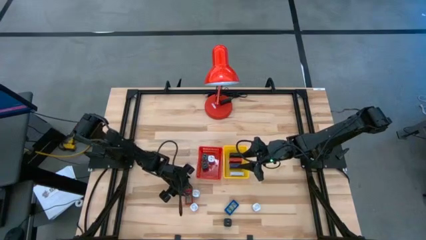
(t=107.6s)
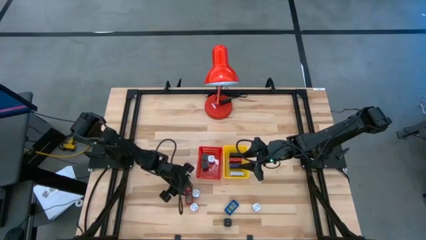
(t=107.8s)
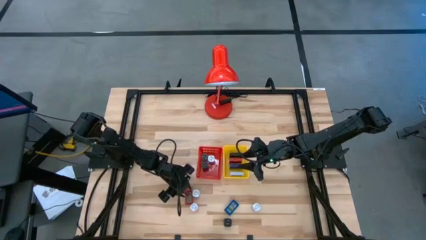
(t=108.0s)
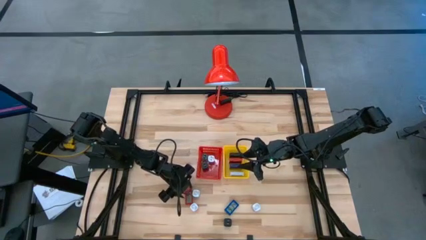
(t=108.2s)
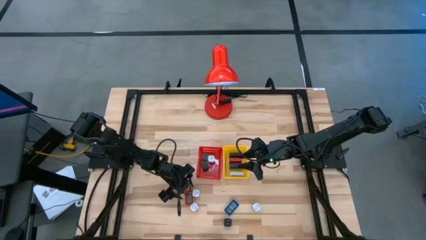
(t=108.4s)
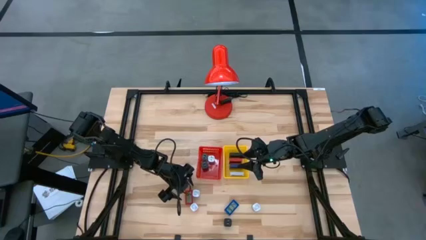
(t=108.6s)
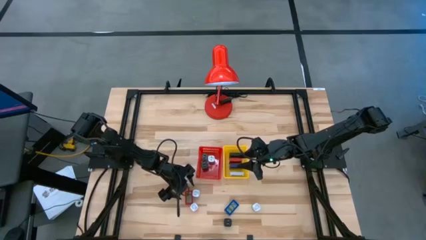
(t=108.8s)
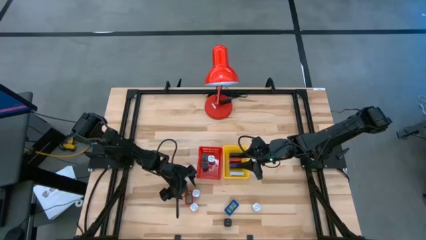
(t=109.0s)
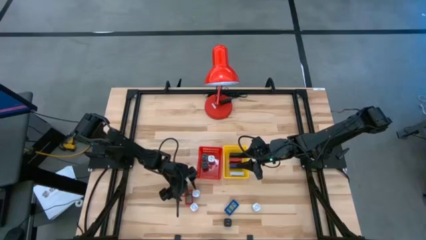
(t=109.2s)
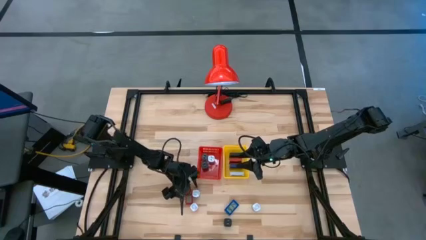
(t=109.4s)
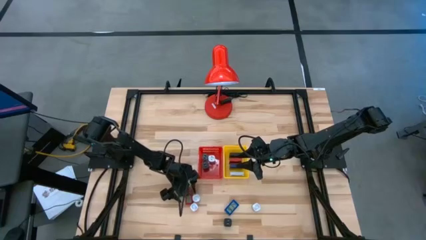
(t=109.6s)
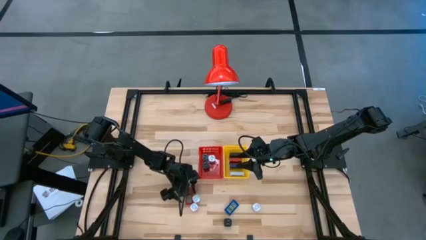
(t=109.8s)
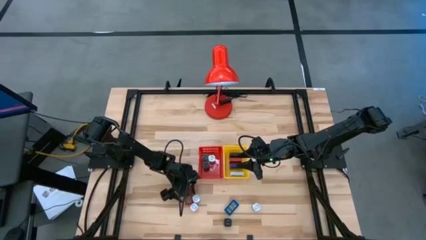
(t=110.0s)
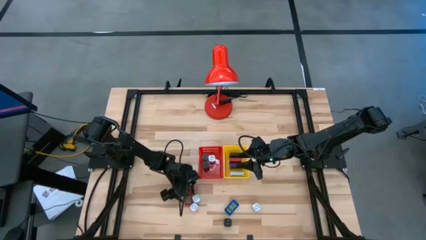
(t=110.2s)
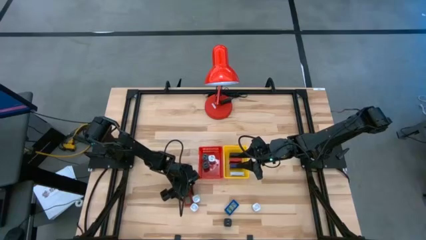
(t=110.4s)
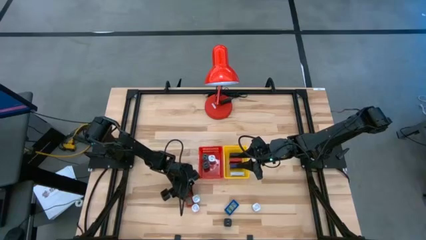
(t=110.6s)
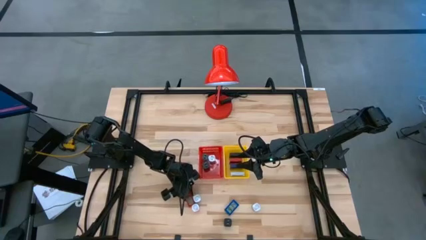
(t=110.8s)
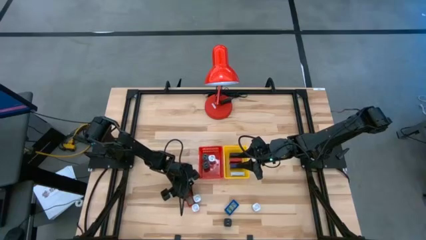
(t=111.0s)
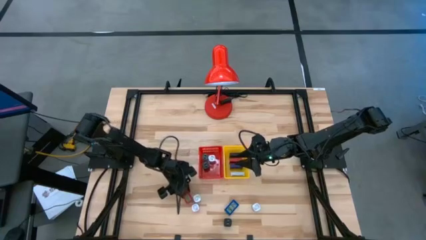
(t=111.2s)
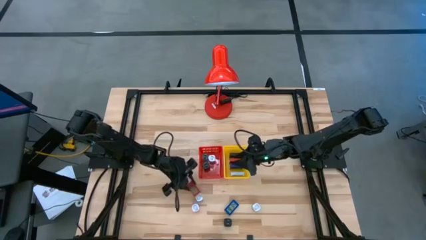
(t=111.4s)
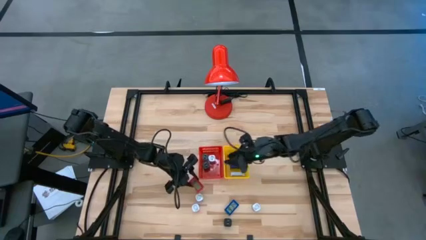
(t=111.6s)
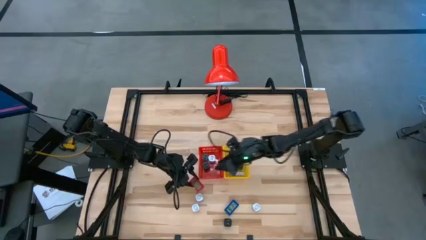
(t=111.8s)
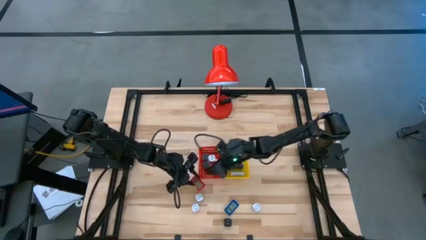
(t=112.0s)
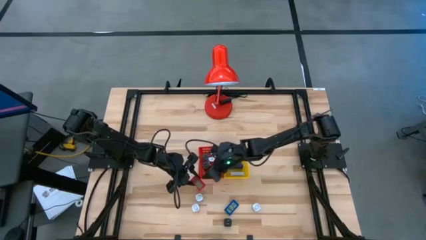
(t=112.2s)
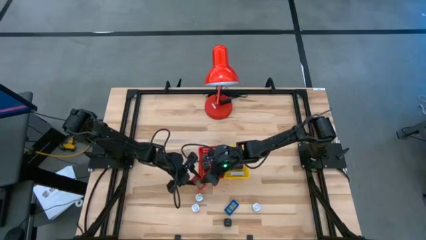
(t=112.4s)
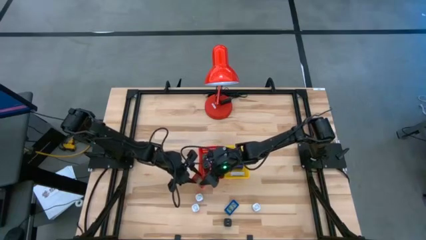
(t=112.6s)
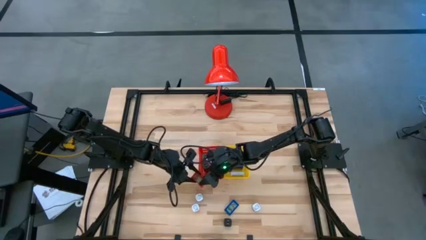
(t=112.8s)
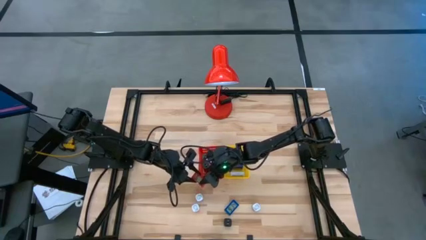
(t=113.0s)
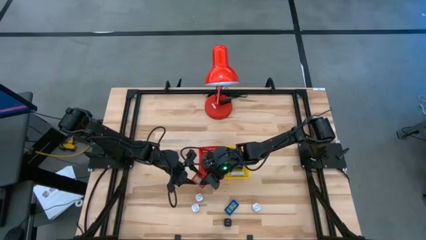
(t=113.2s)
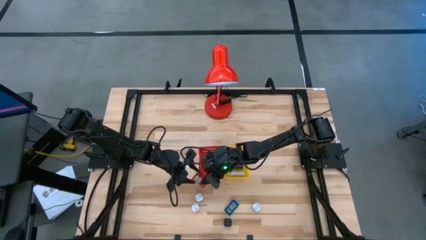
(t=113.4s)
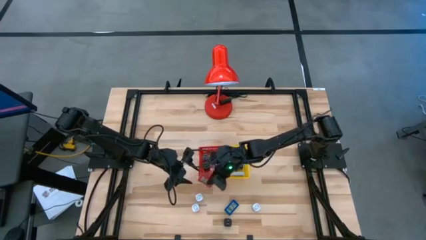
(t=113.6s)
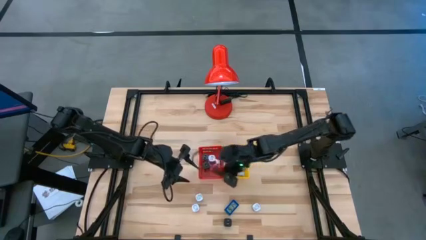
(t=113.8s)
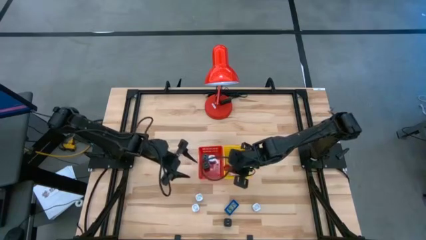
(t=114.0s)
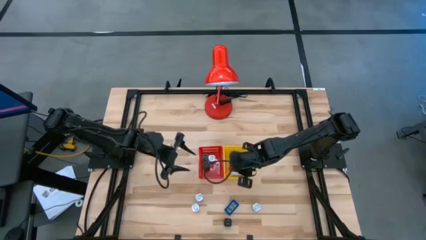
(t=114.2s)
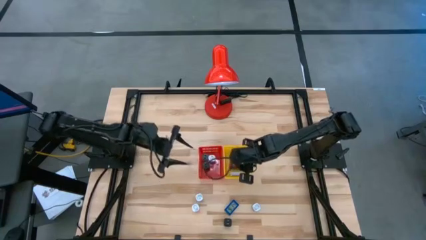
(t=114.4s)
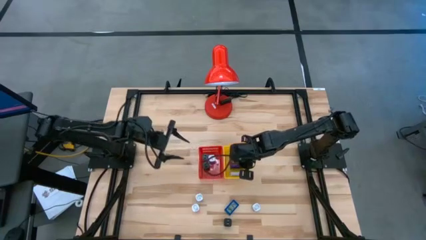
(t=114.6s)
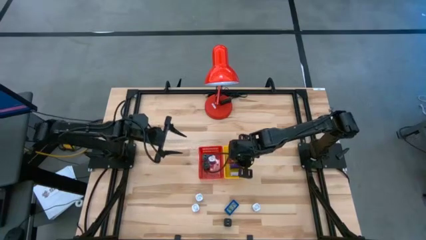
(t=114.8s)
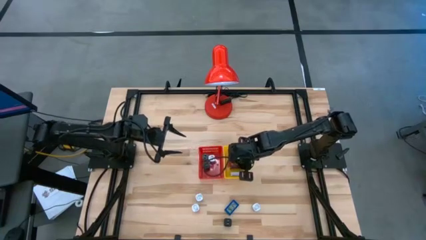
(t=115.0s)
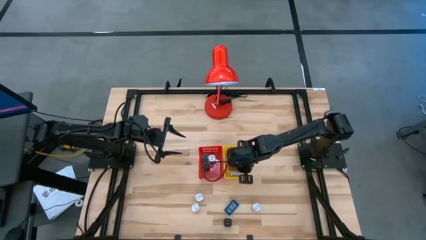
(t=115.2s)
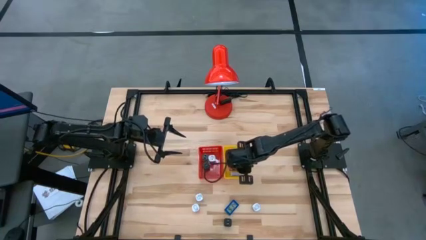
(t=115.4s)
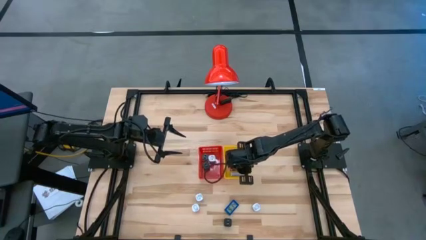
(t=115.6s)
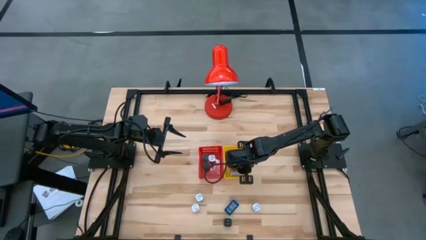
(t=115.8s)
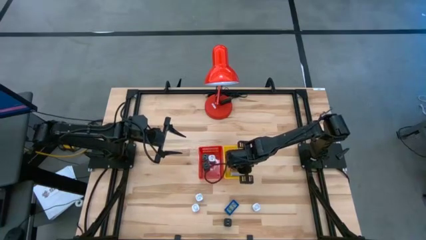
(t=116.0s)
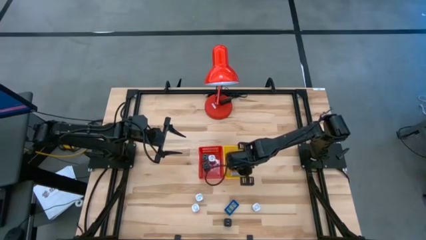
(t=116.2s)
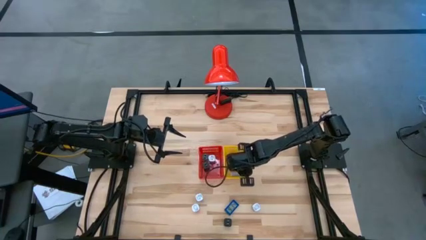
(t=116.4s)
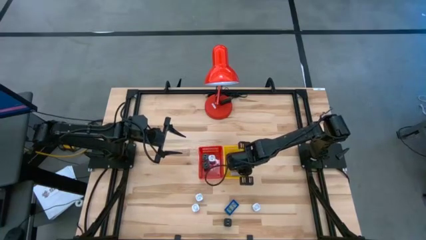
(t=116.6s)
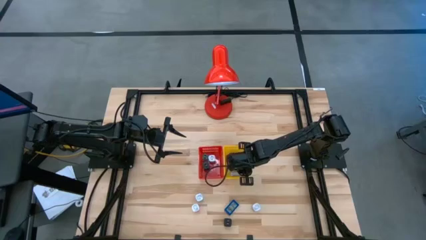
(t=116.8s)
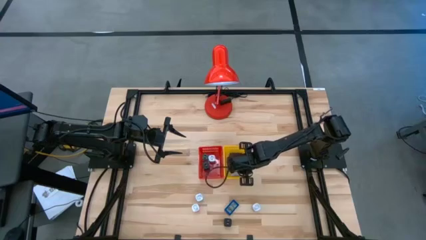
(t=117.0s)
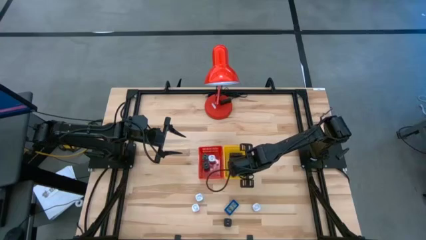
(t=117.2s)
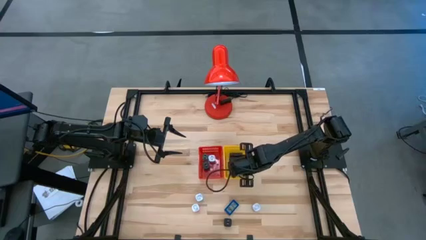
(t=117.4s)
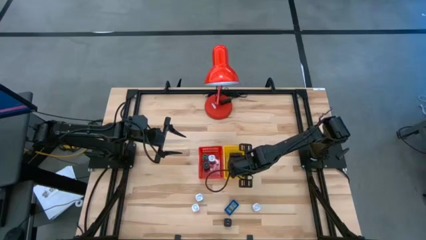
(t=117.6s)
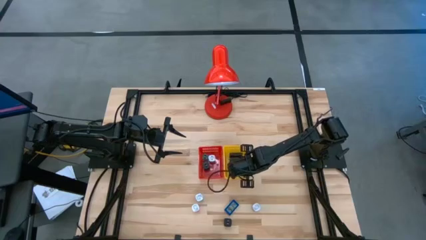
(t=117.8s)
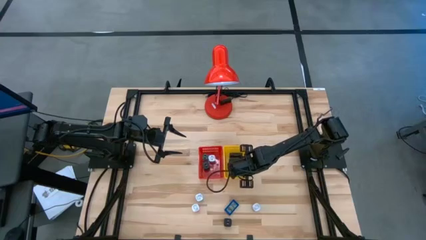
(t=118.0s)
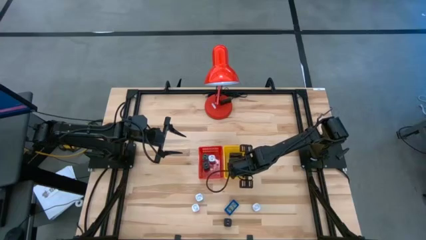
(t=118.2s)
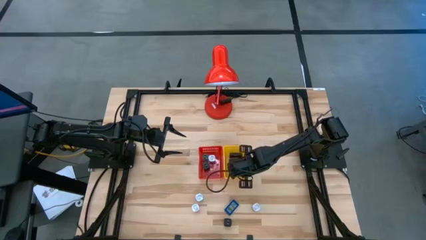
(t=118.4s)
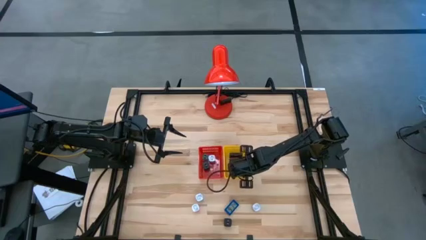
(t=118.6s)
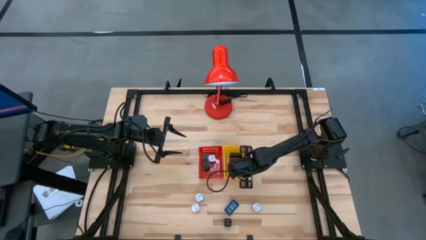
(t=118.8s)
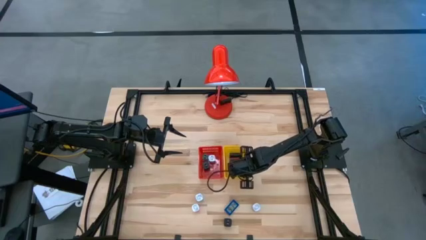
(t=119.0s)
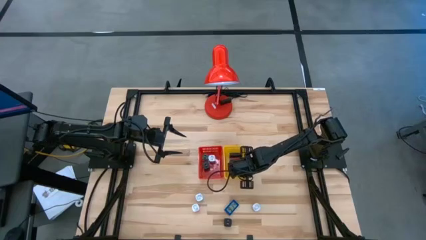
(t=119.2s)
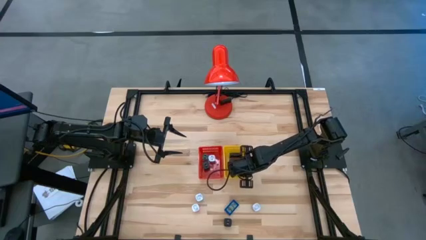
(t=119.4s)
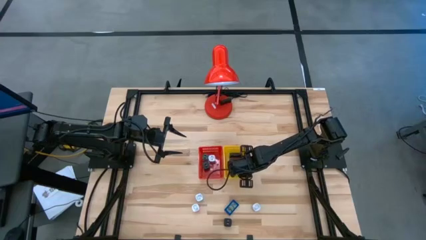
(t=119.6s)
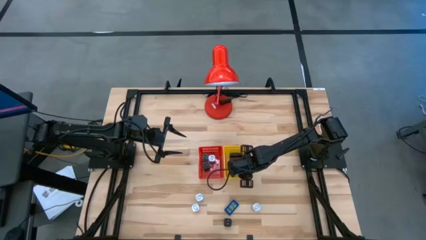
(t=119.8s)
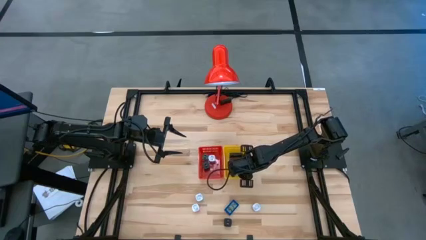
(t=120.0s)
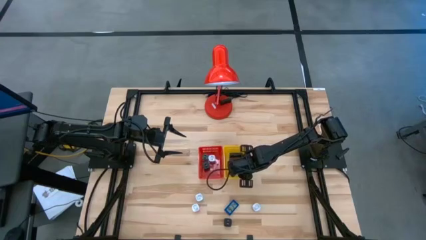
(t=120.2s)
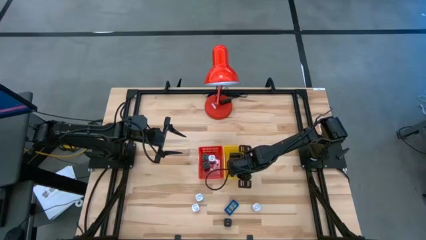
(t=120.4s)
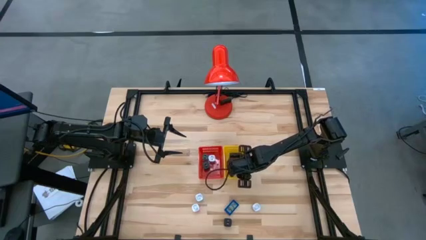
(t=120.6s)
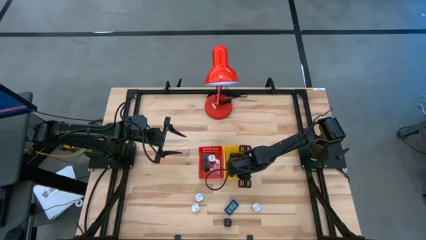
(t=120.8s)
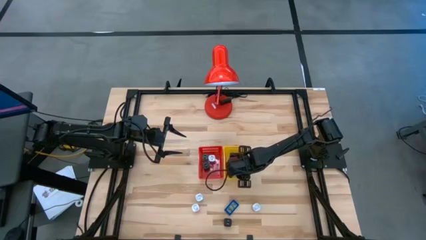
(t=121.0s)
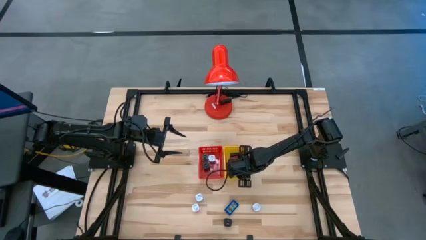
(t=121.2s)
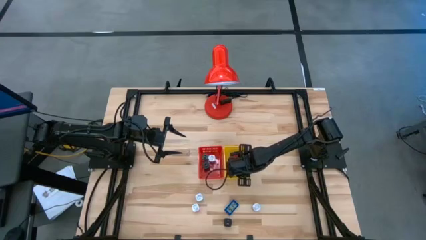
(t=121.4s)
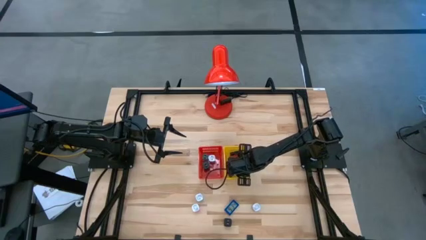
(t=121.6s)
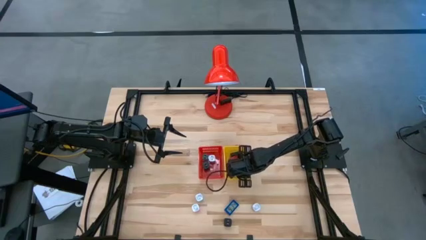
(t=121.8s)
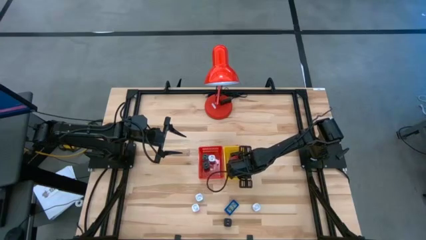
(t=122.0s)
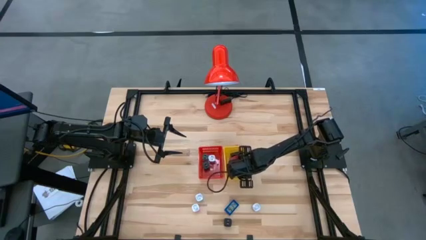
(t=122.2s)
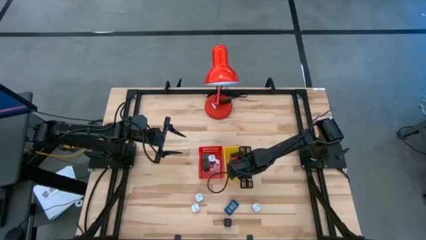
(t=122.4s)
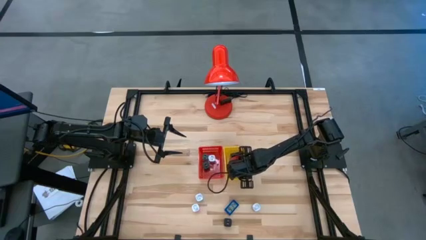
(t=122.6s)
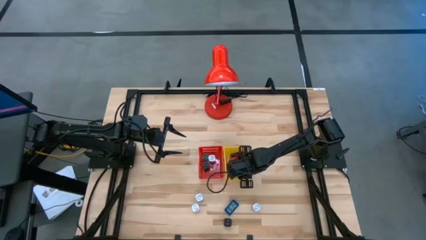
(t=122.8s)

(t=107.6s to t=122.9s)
Task: Pick & Place Office items
Put the red digital timer into the yellow bin
